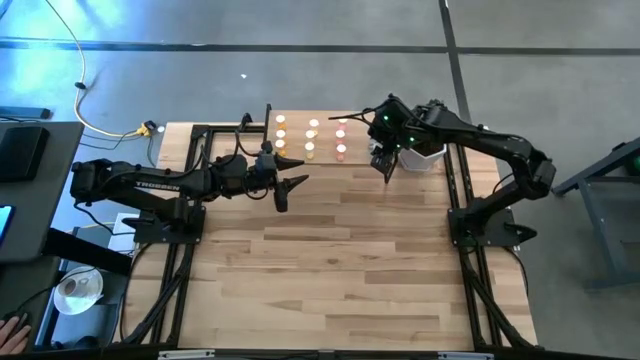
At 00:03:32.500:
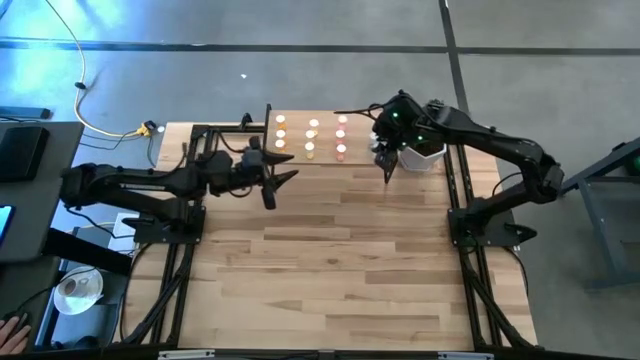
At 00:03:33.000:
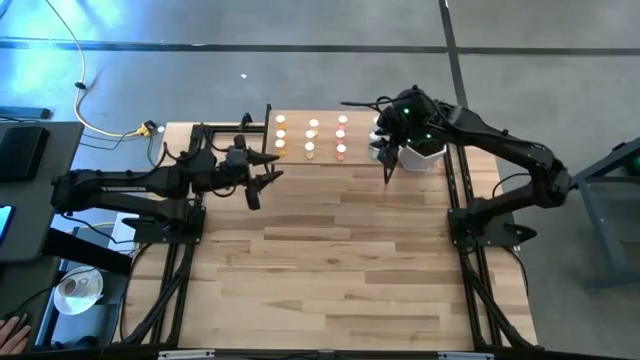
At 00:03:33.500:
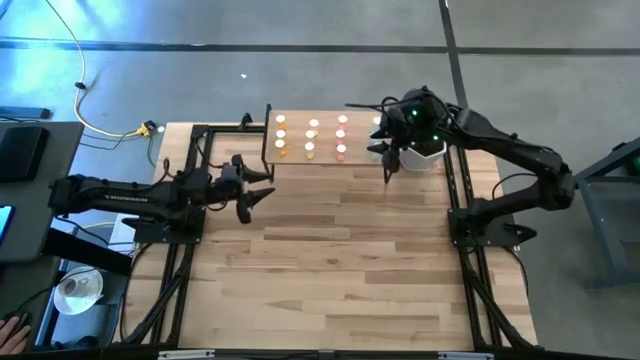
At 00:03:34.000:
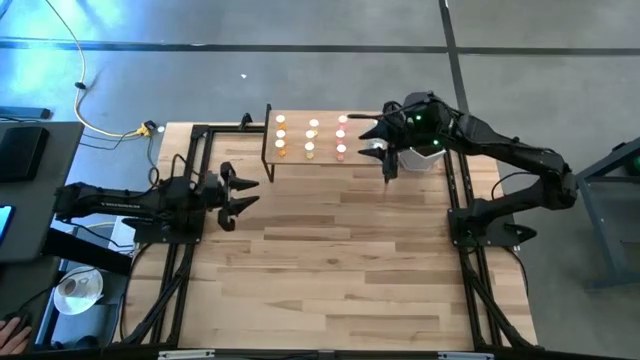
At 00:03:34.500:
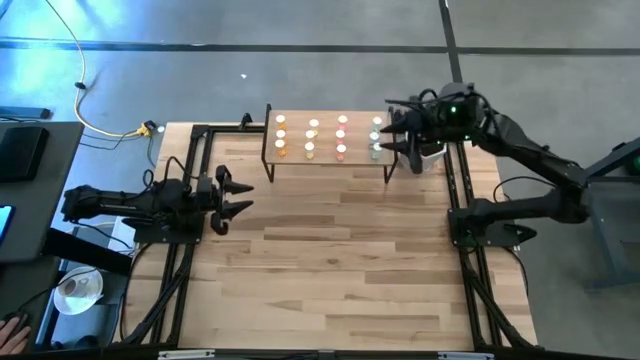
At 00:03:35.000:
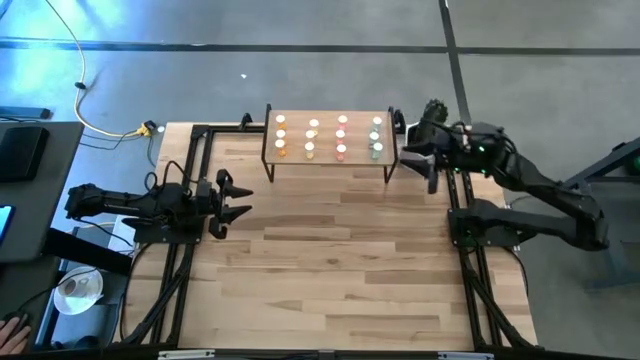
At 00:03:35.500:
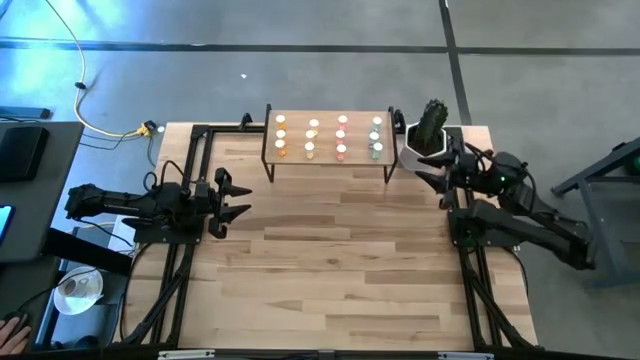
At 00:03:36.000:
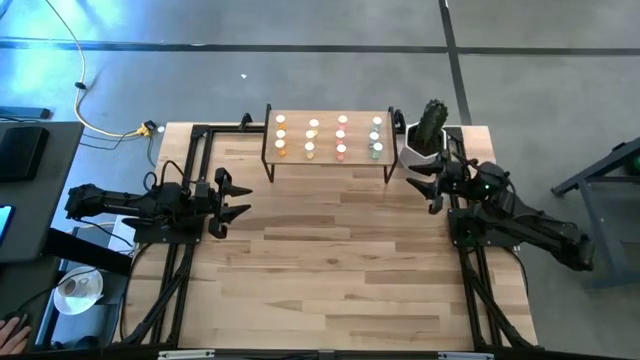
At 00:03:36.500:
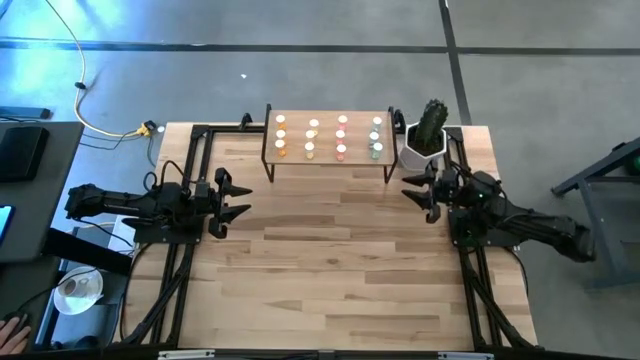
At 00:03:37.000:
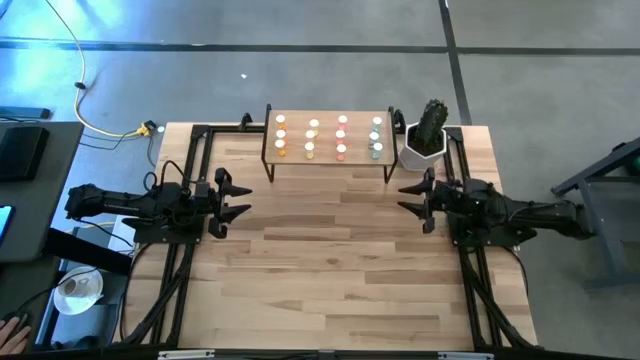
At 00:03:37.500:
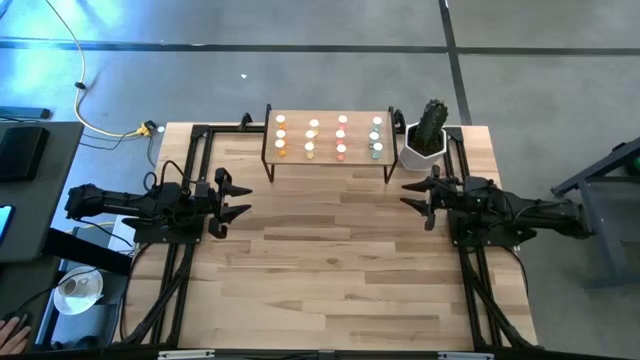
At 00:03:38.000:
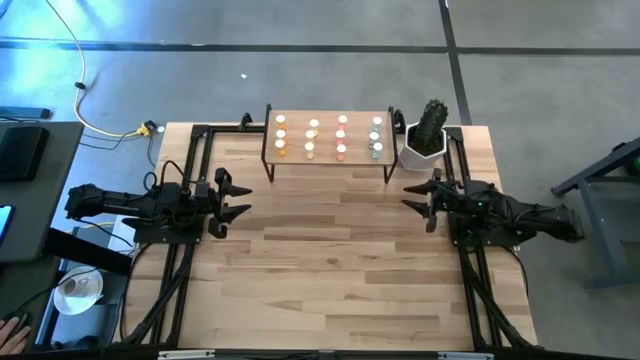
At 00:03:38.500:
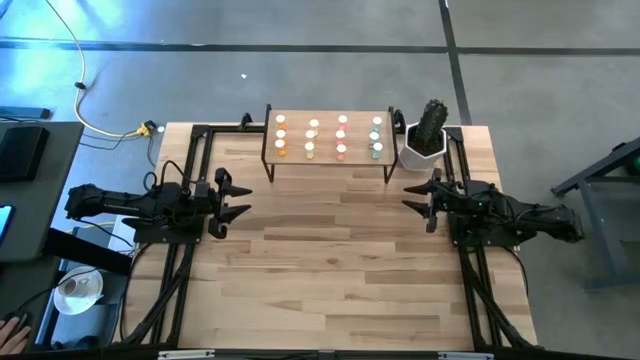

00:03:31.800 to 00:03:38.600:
Task: Pick and place medicine bottles onto shelf by color
Return to Home Position
